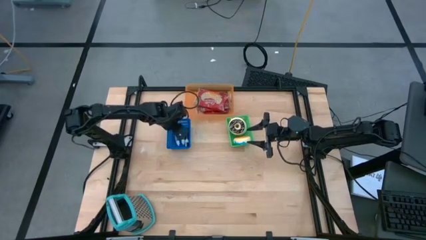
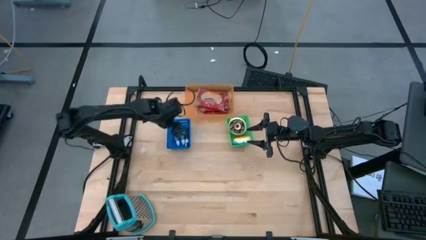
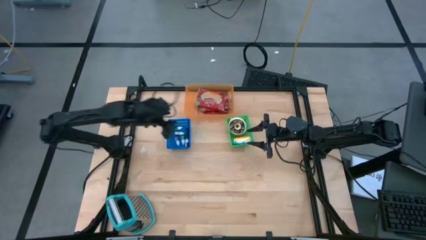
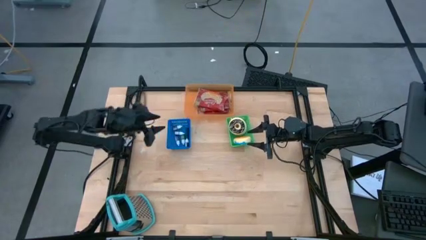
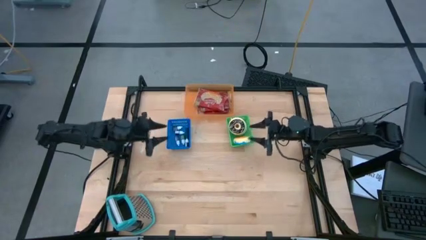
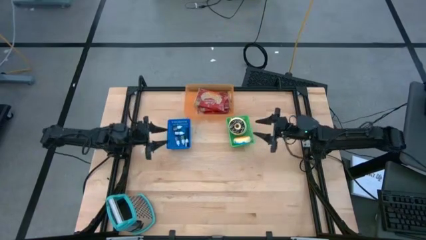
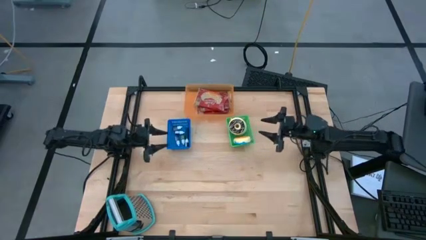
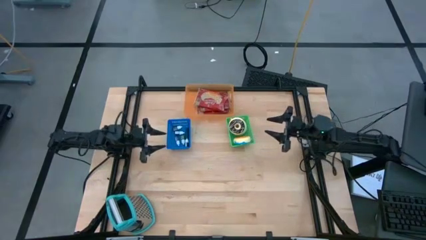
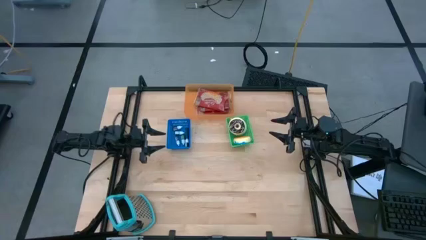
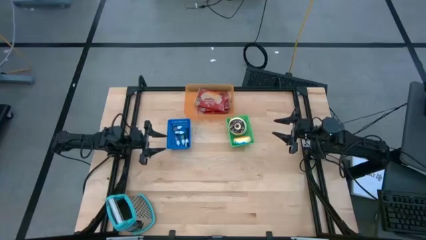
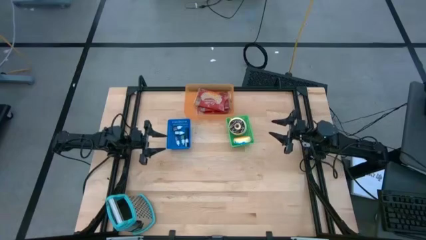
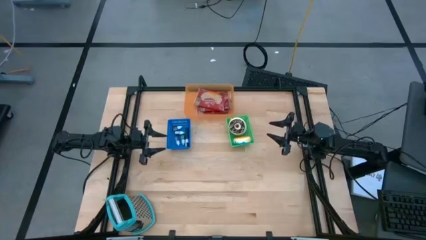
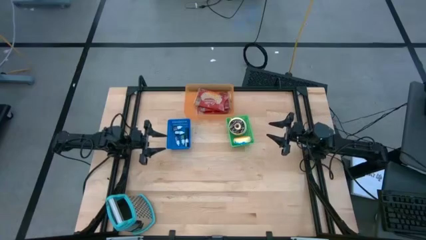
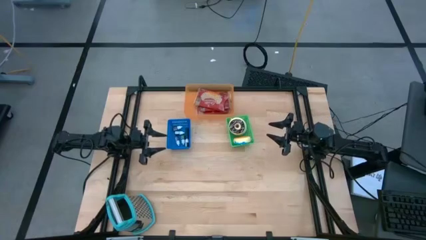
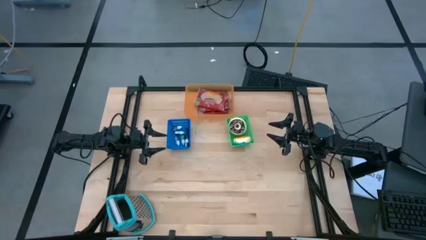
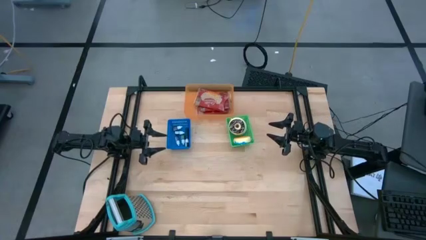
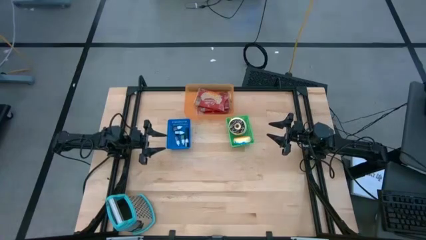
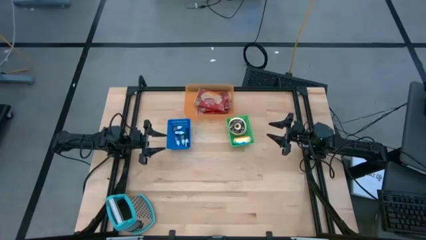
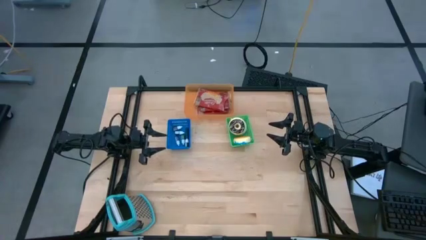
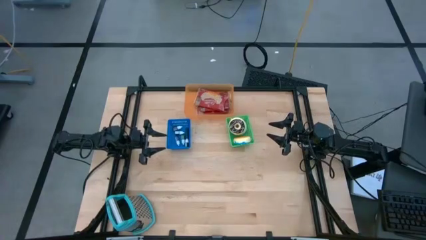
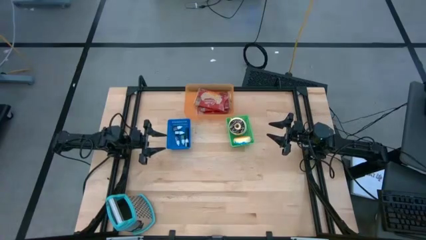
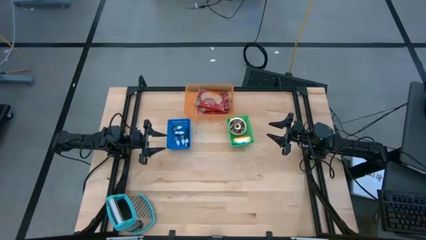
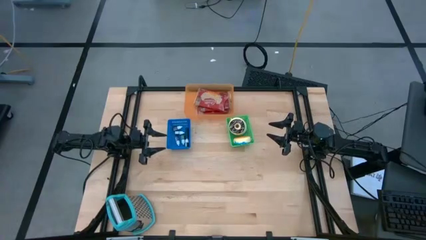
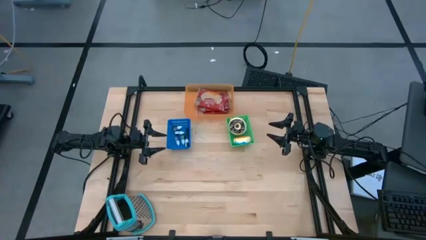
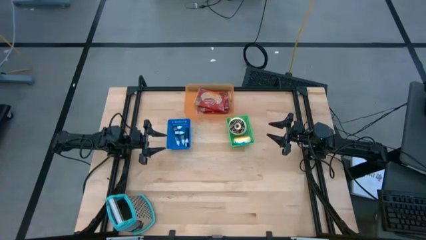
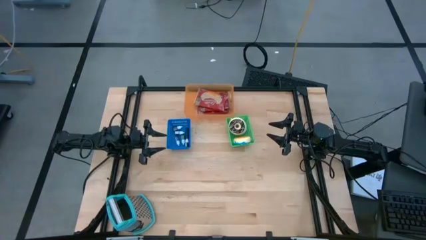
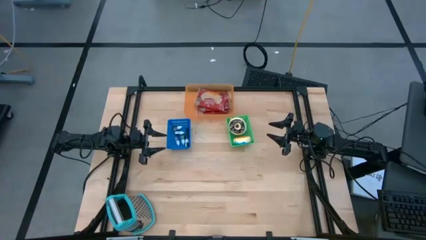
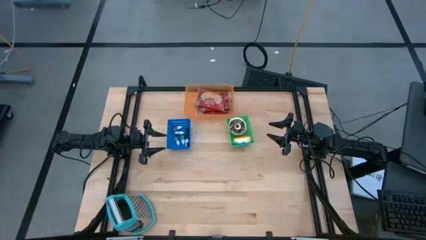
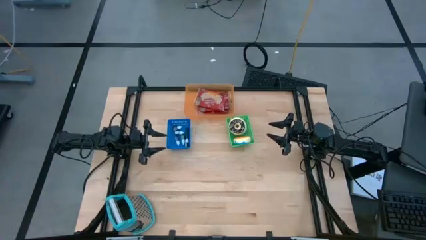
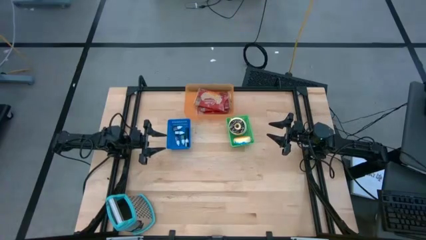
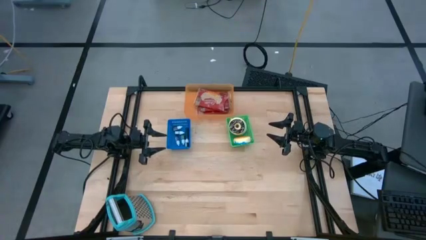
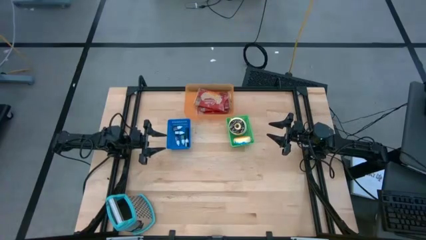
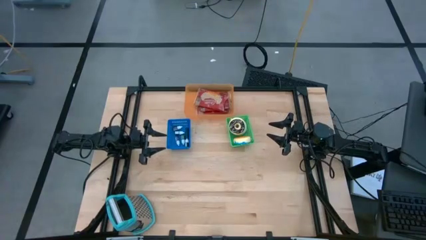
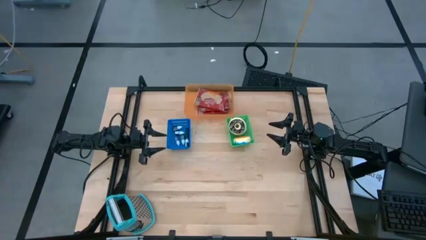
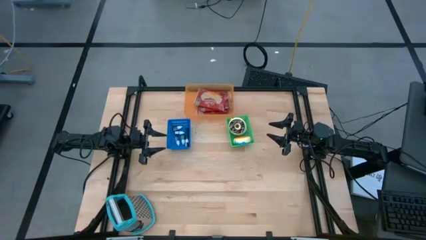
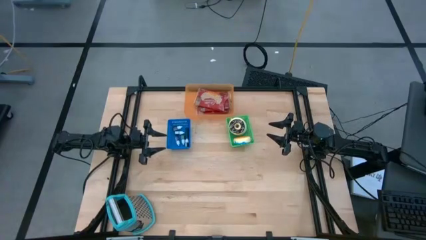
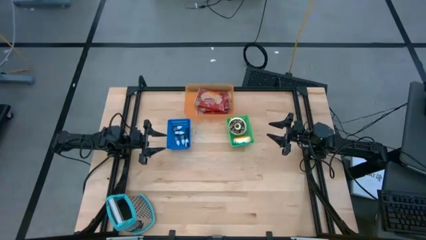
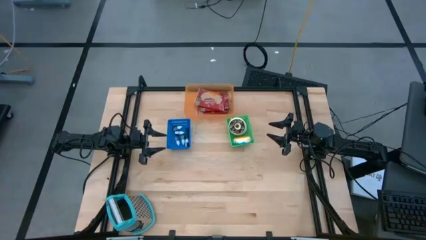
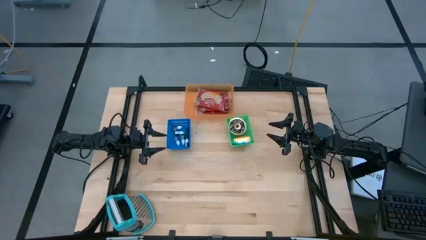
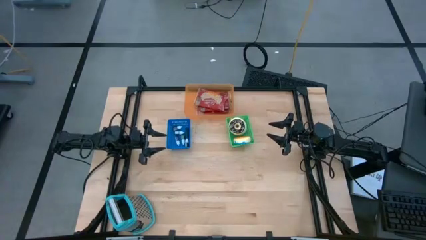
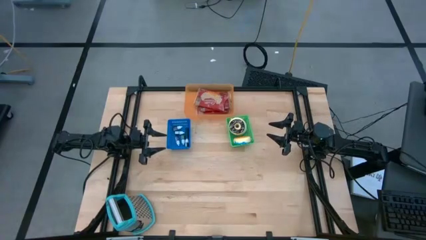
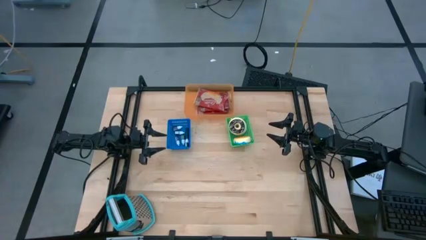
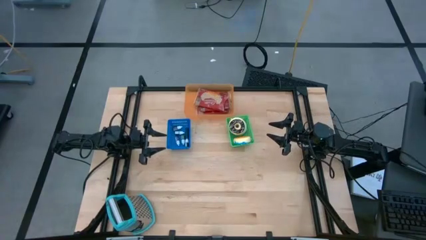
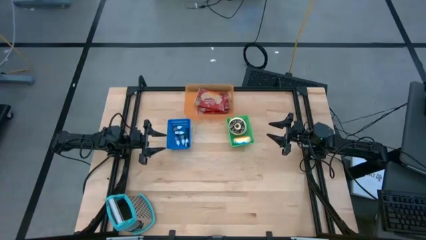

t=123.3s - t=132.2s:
Return to Home Position
